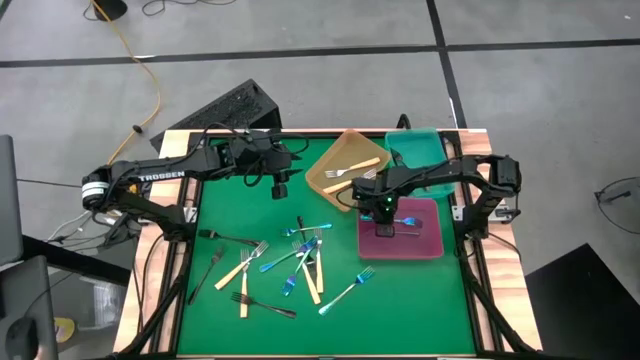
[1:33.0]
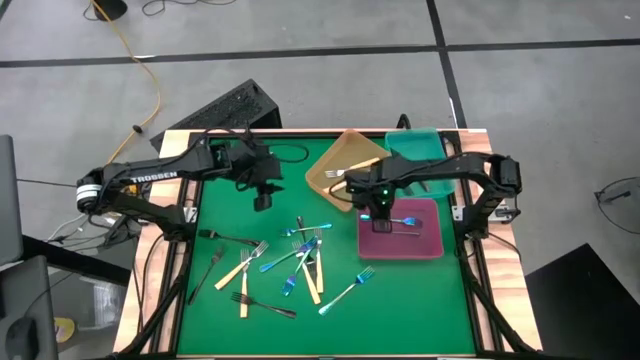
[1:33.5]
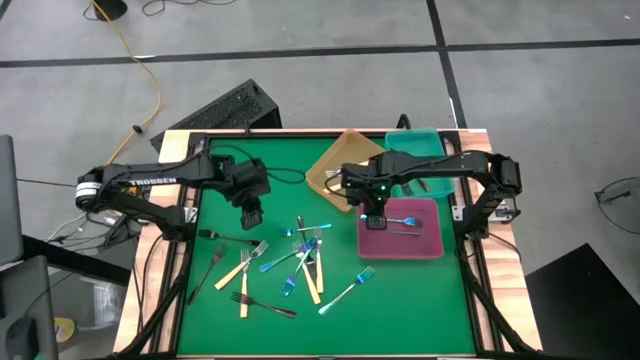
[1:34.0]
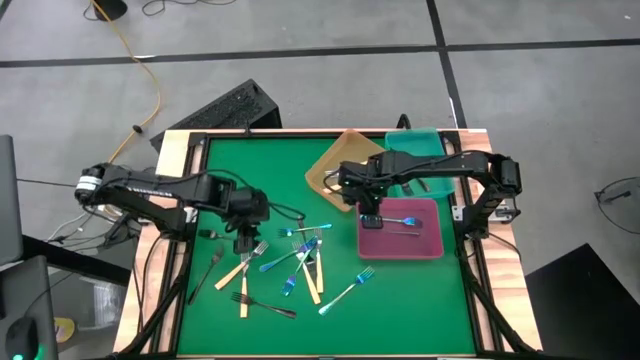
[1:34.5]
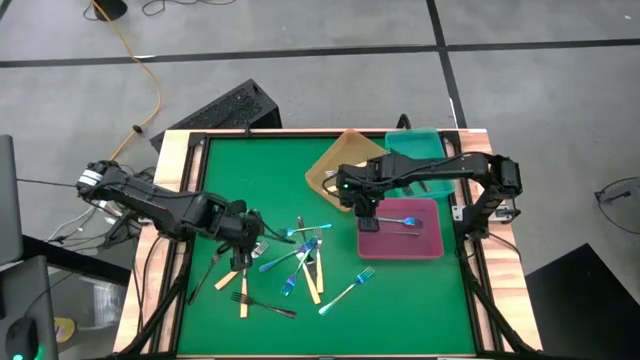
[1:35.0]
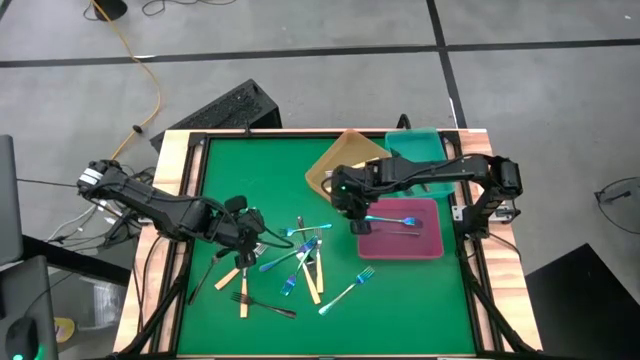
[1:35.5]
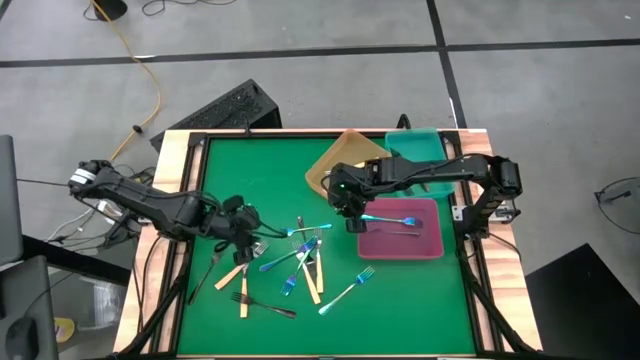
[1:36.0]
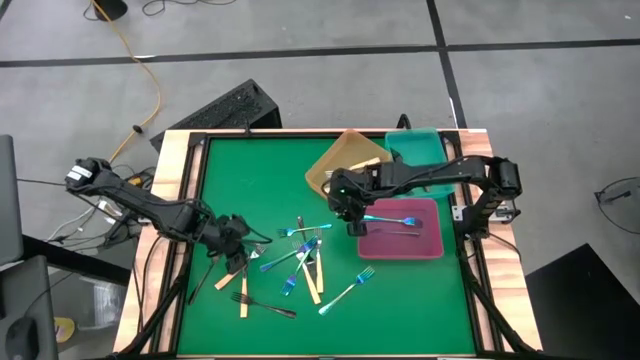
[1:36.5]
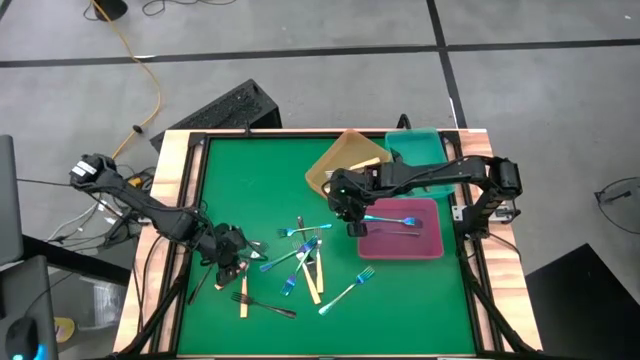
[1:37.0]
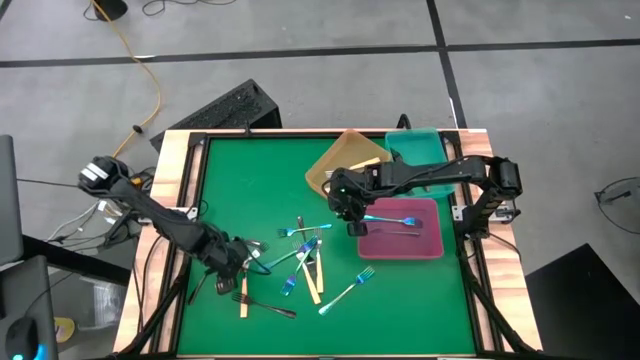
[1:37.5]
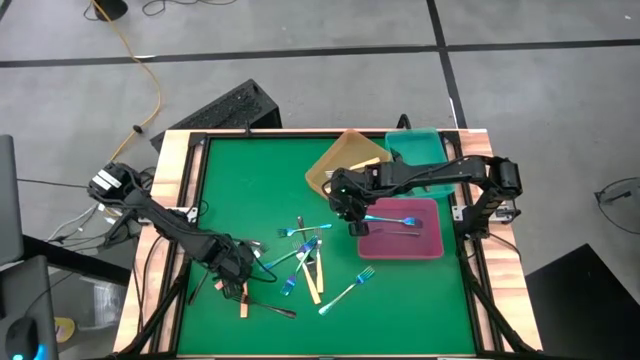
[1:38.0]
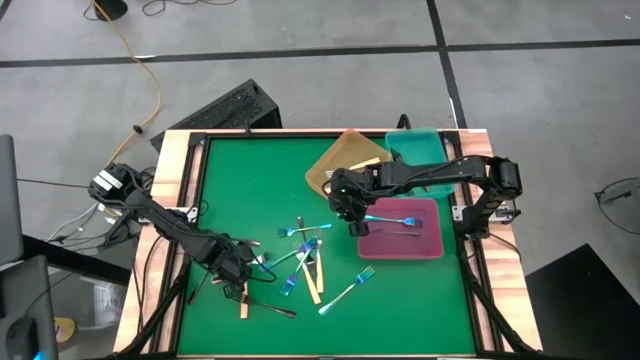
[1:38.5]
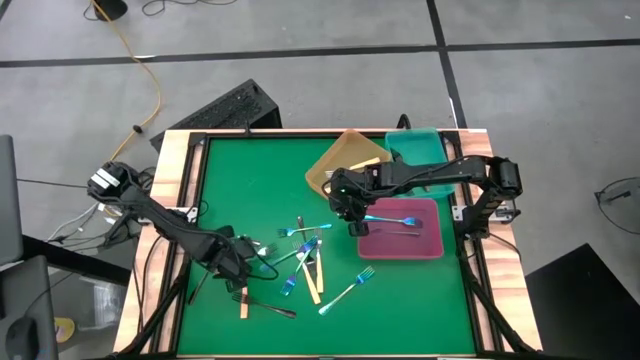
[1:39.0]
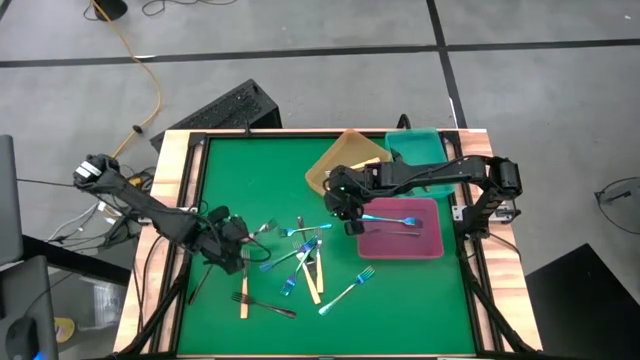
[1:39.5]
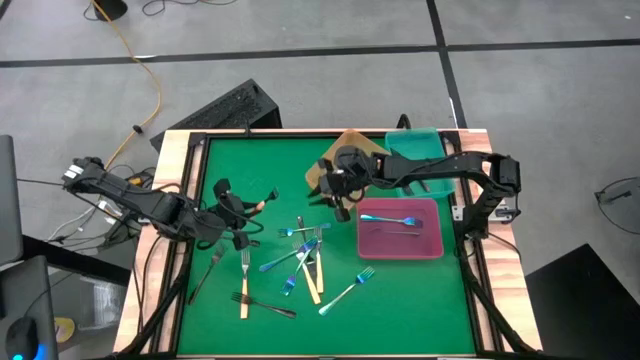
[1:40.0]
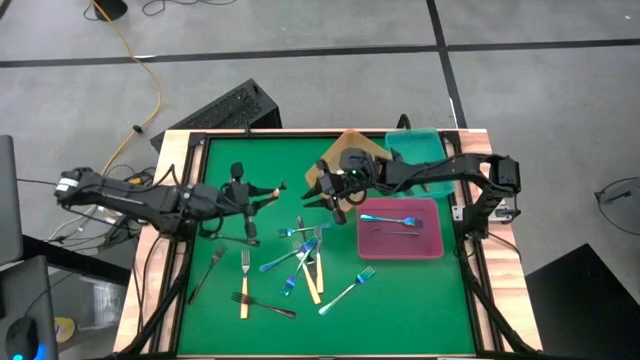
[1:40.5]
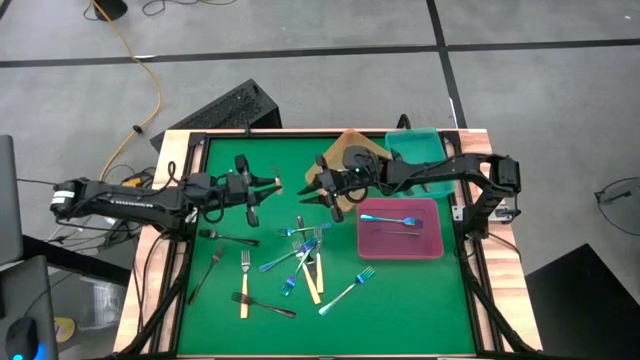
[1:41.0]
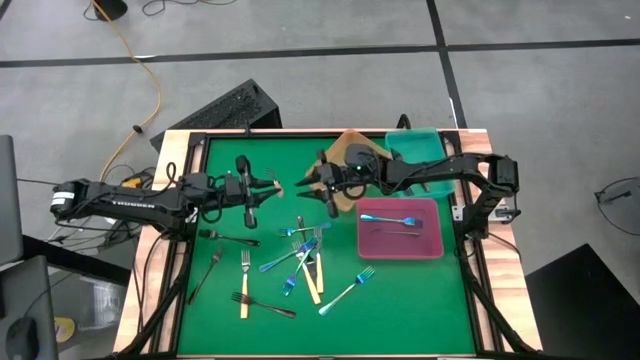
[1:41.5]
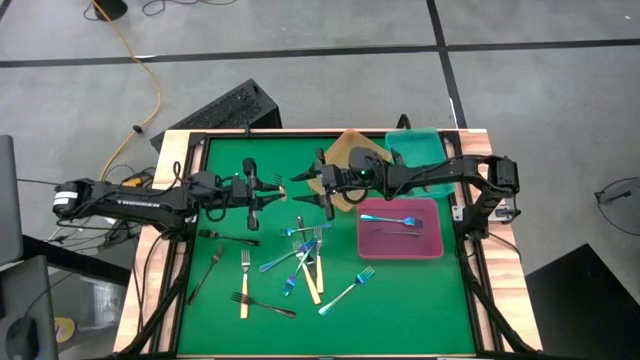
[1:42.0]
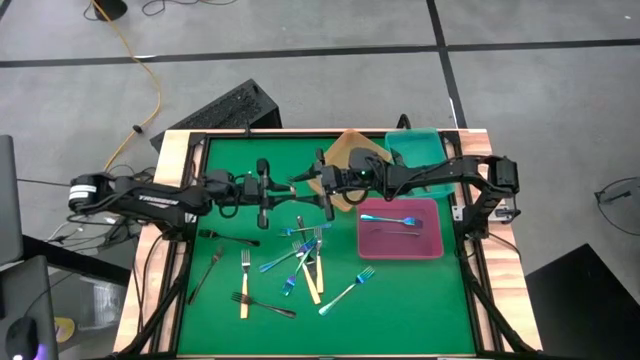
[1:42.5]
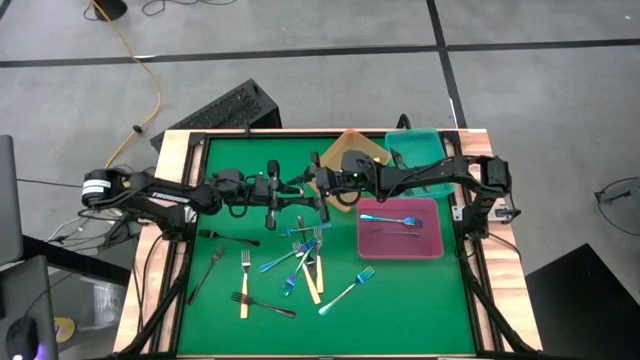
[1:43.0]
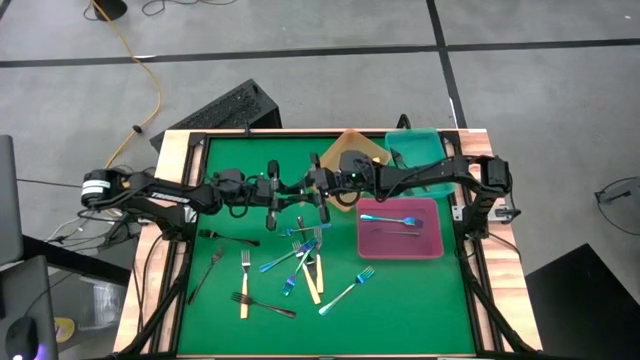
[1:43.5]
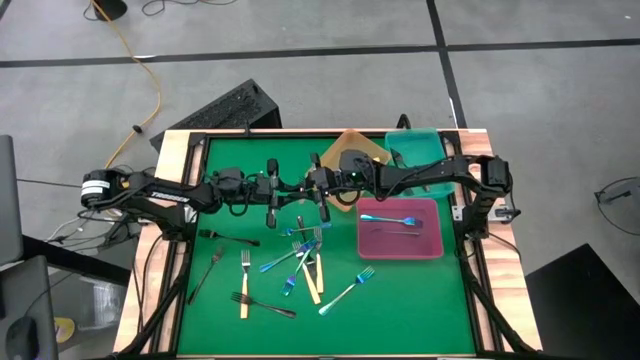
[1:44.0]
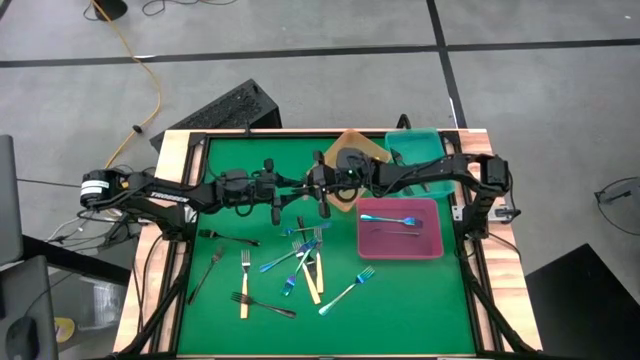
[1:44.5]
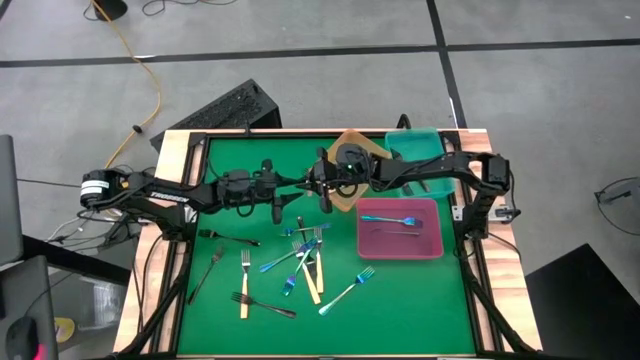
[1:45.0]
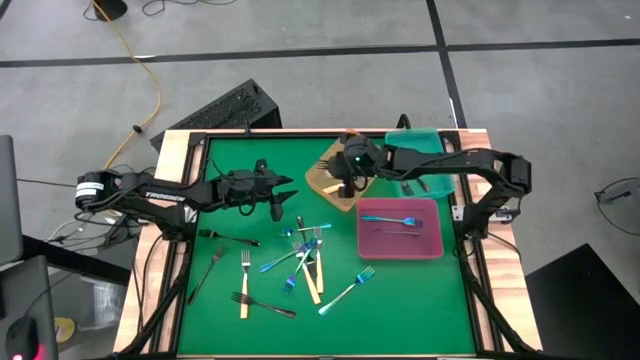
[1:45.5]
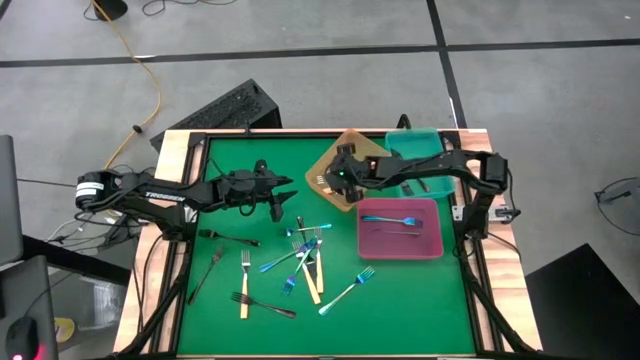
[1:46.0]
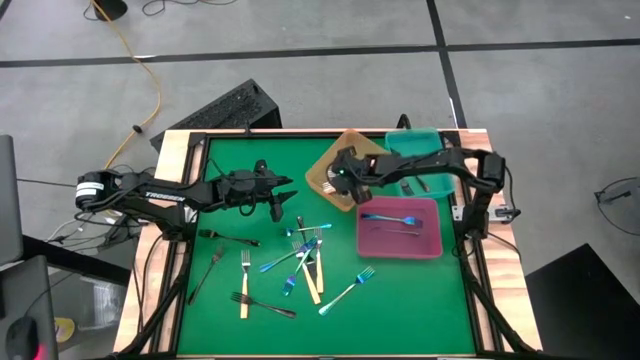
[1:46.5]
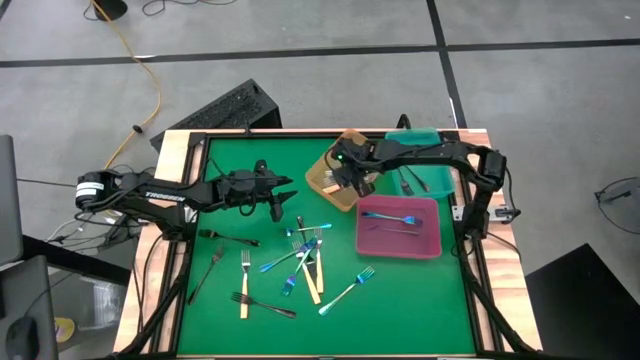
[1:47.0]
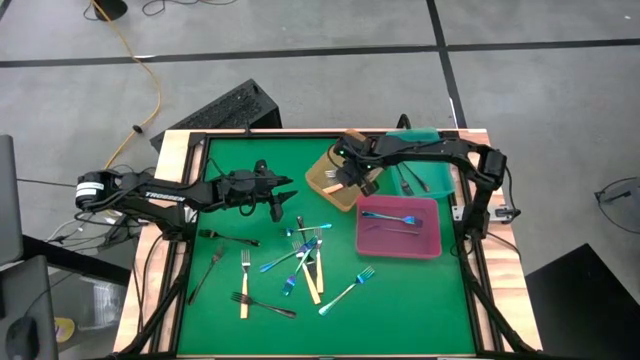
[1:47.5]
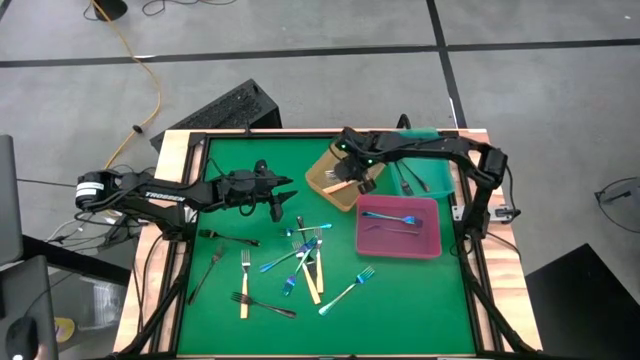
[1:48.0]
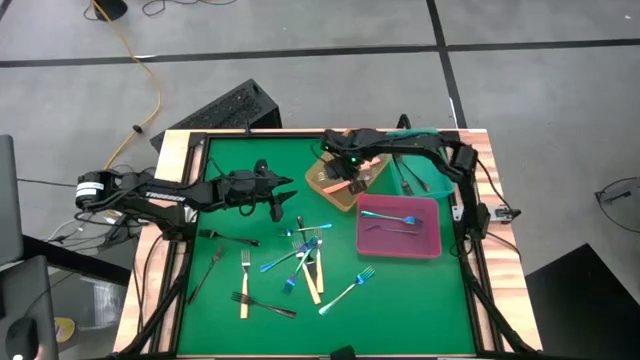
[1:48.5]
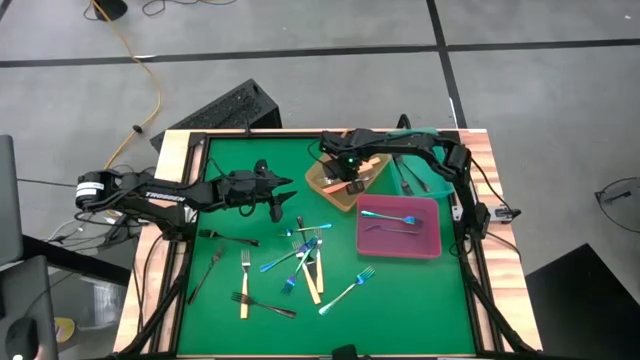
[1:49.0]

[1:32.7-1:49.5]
Task: Sort silverware by color (type)
Put the orange fork into the orange bin

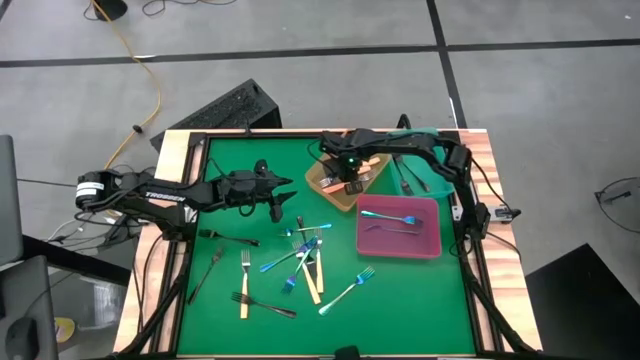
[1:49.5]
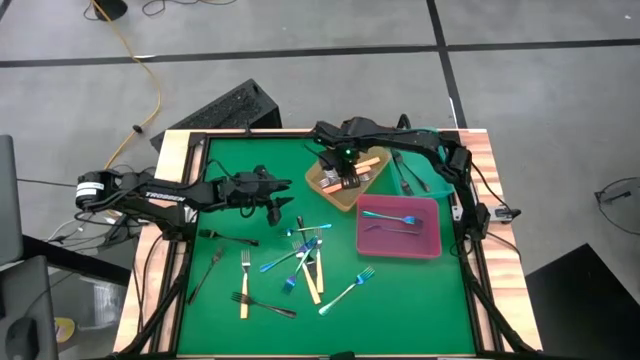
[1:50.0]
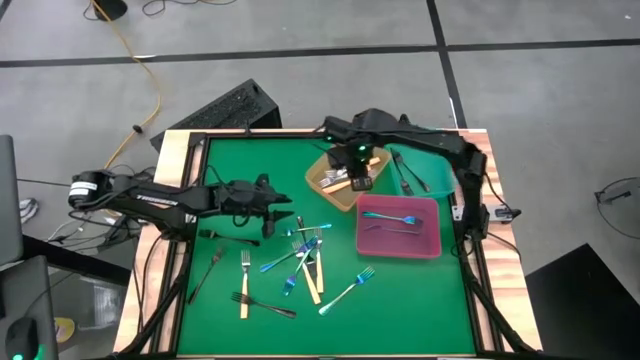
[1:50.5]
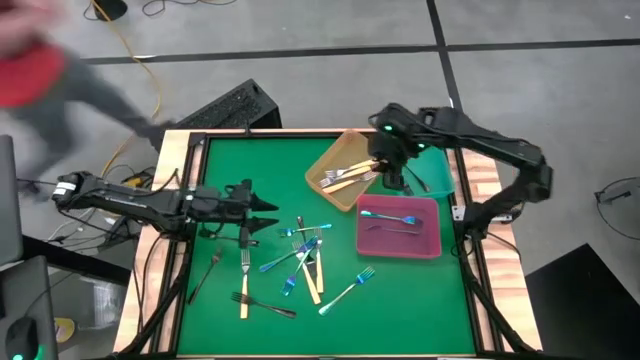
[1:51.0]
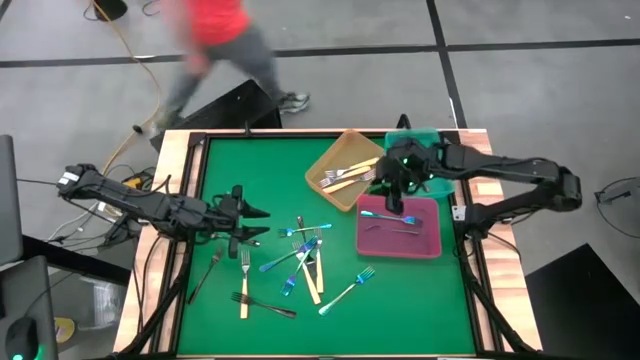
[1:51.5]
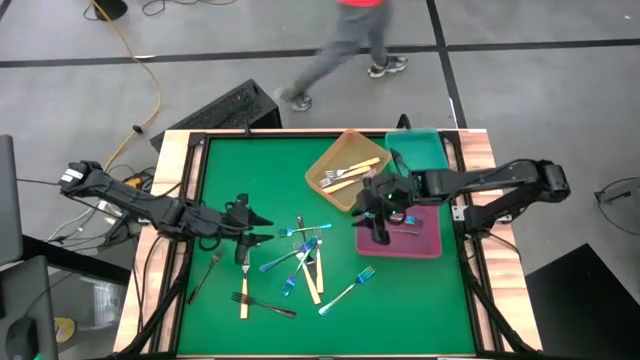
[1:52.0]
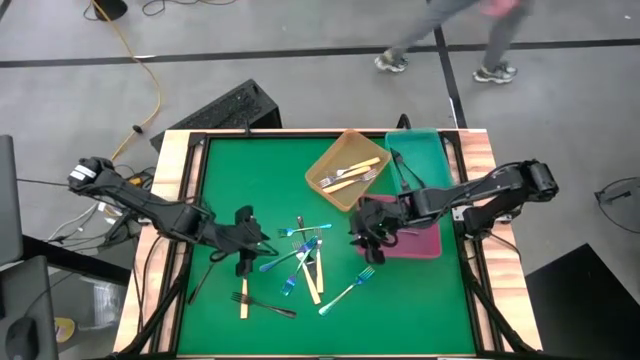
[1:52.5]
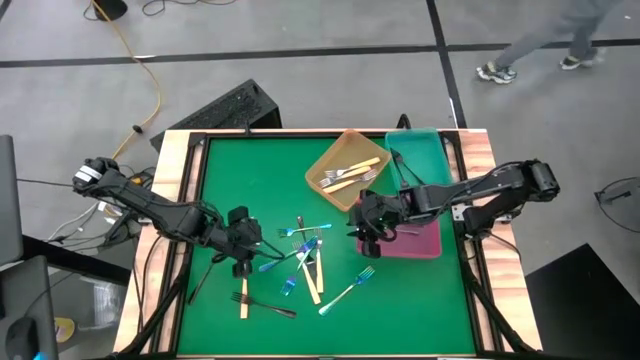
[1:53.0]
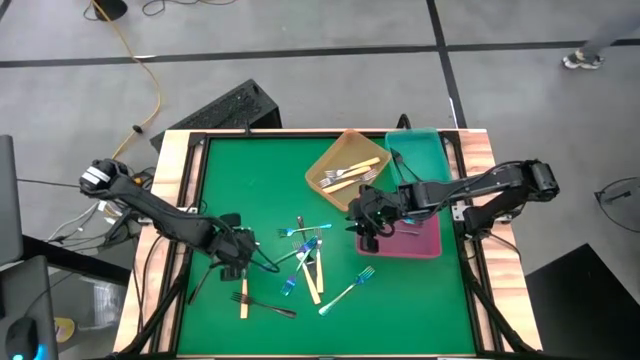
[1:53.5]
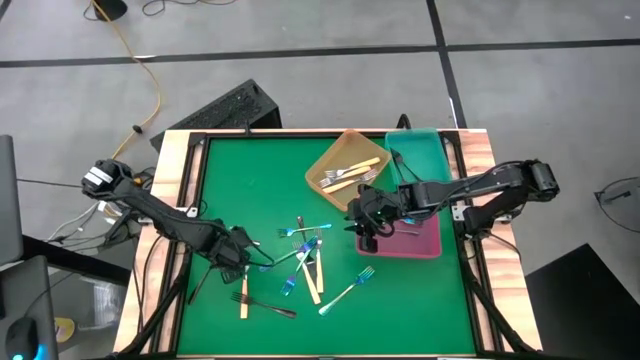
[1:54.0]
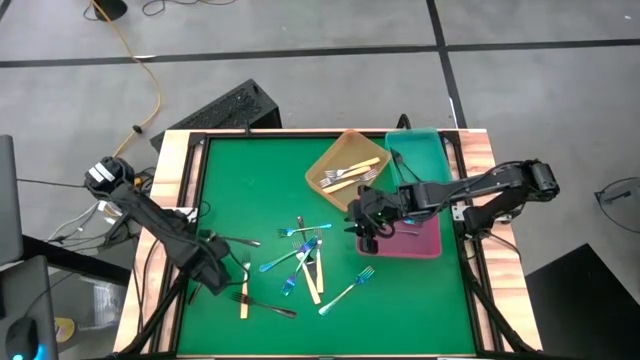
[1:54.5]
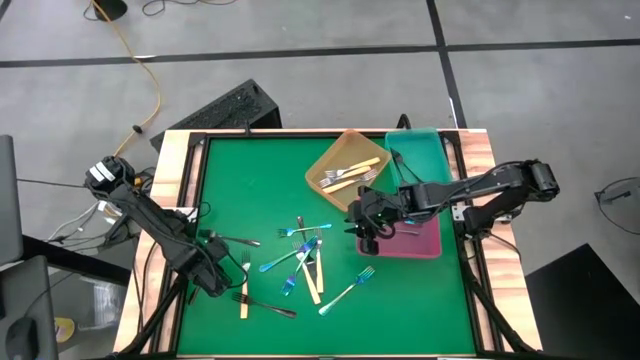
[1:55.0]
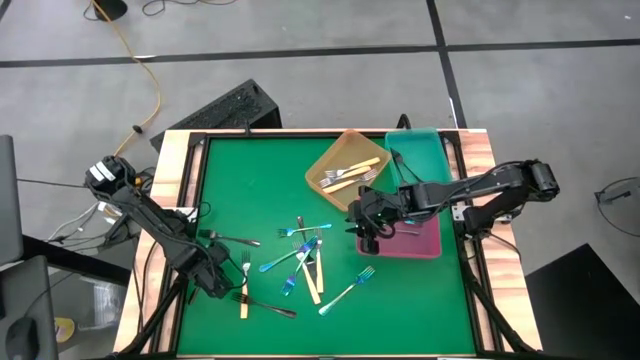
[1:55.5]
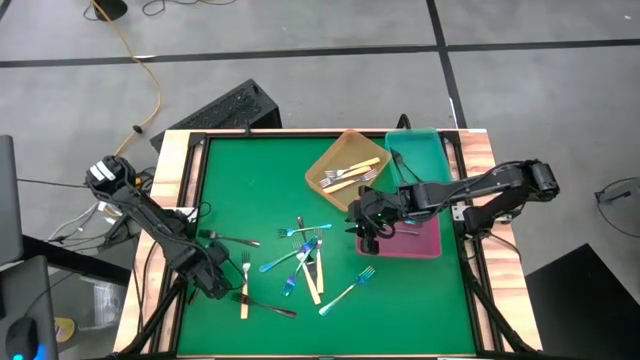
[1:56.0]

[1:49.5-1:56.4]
Put the black fork into the blue bin
